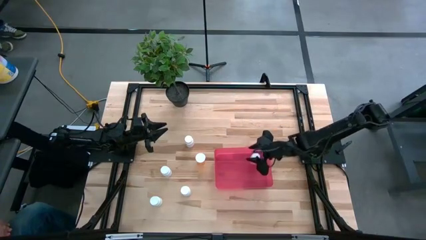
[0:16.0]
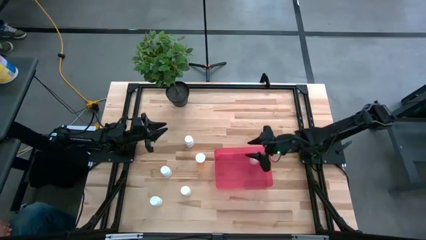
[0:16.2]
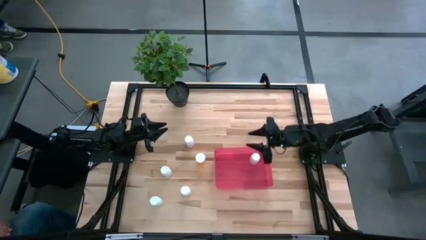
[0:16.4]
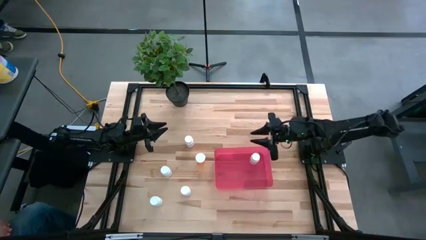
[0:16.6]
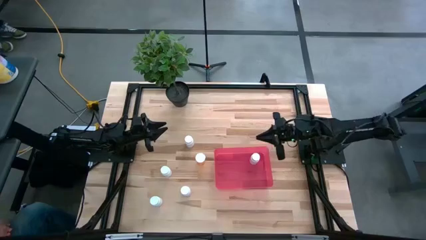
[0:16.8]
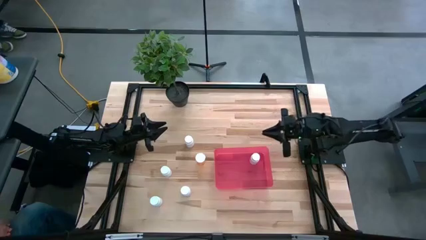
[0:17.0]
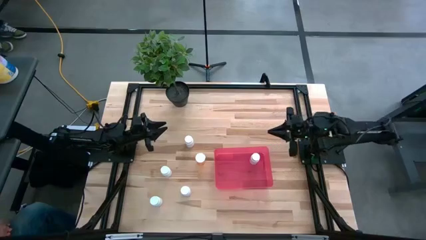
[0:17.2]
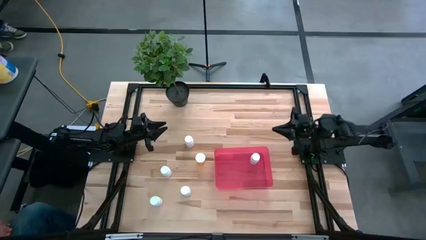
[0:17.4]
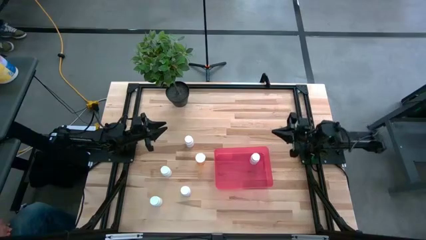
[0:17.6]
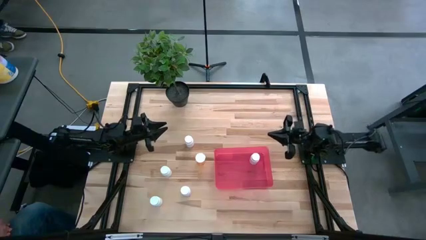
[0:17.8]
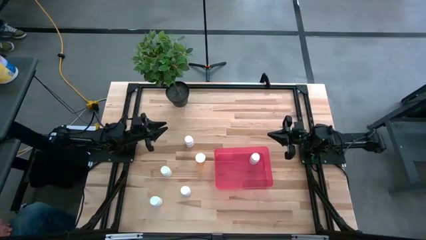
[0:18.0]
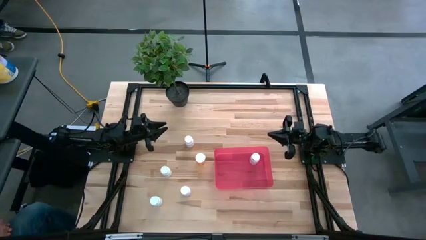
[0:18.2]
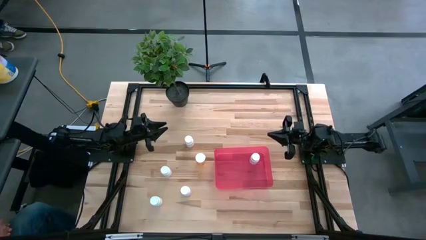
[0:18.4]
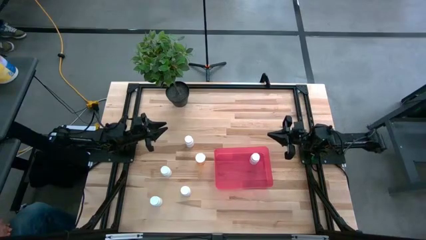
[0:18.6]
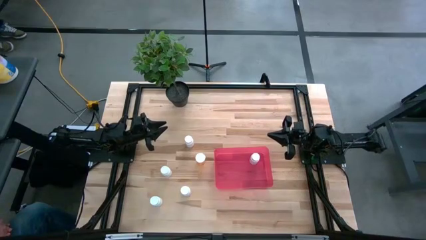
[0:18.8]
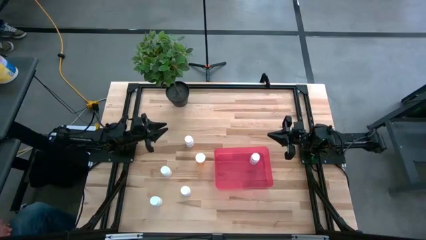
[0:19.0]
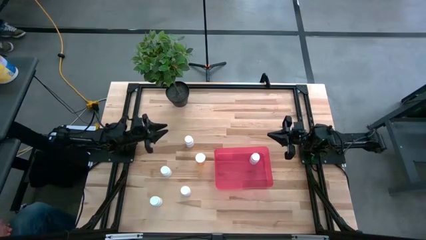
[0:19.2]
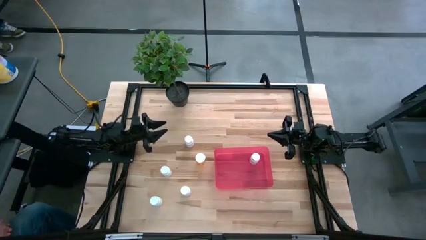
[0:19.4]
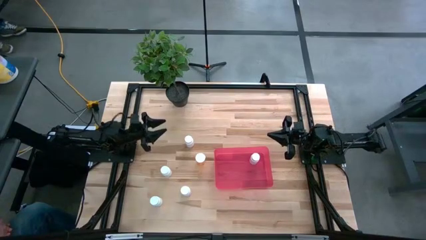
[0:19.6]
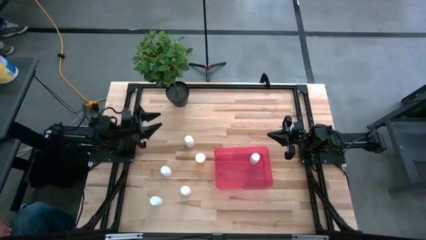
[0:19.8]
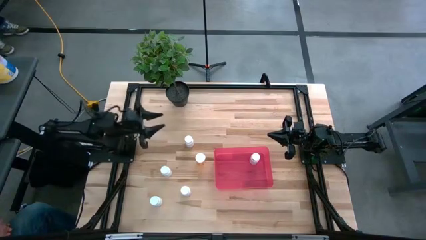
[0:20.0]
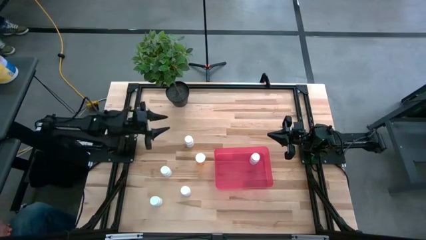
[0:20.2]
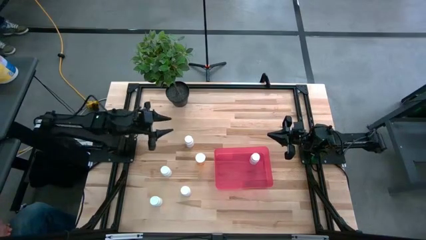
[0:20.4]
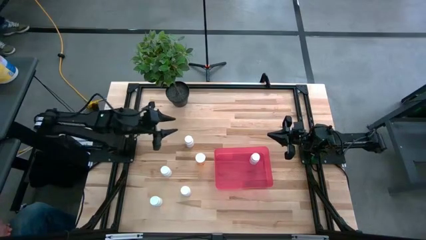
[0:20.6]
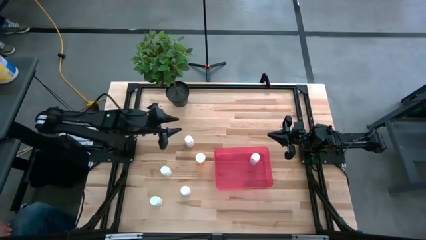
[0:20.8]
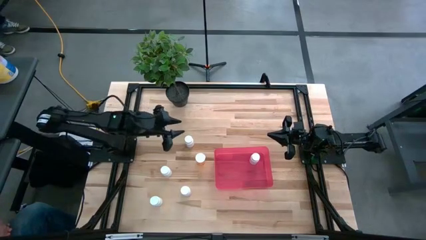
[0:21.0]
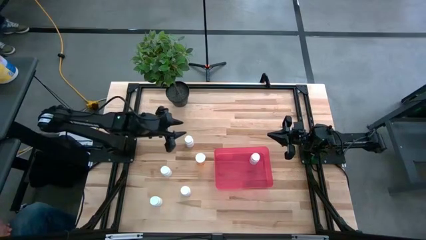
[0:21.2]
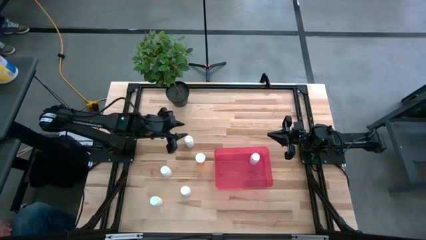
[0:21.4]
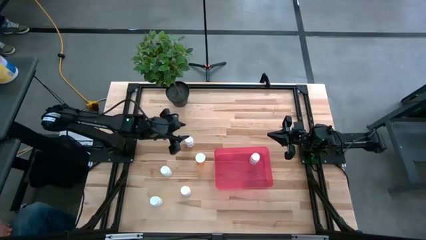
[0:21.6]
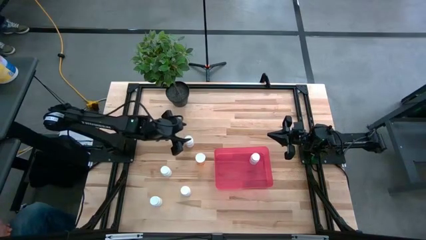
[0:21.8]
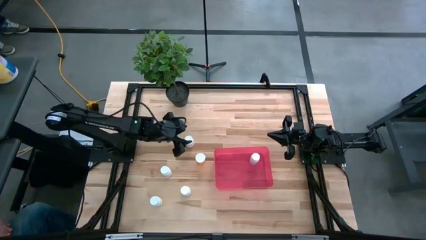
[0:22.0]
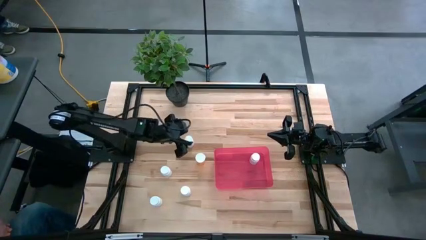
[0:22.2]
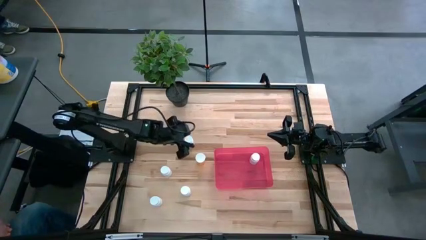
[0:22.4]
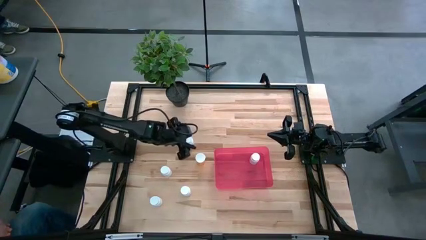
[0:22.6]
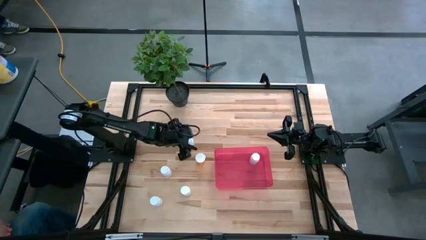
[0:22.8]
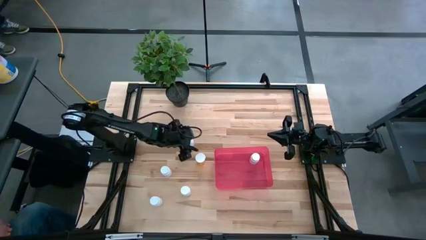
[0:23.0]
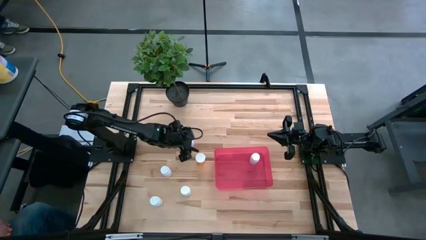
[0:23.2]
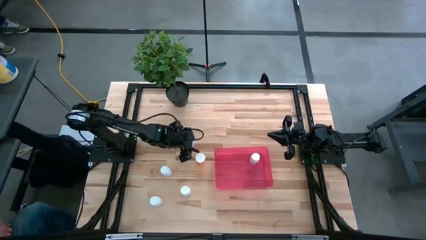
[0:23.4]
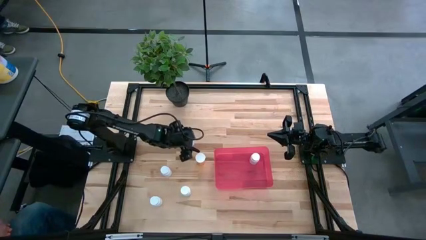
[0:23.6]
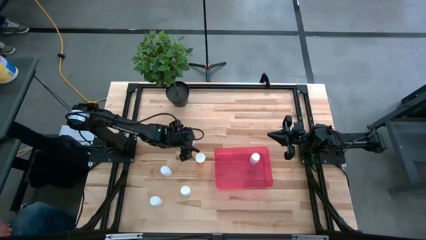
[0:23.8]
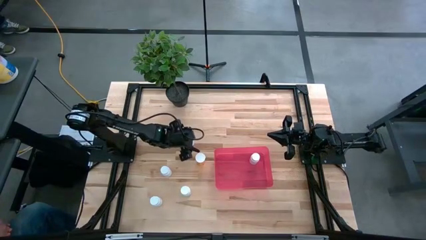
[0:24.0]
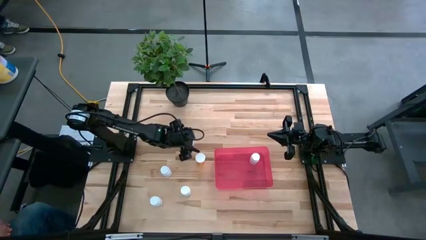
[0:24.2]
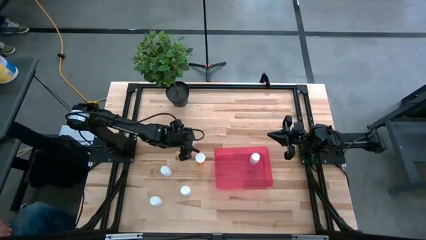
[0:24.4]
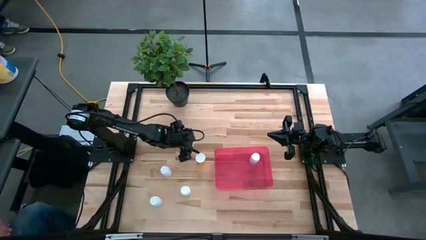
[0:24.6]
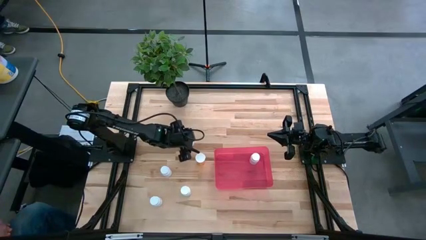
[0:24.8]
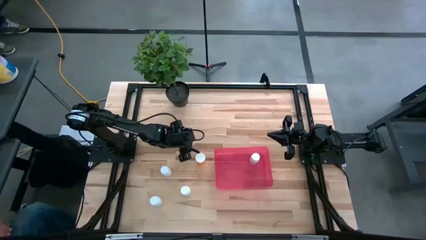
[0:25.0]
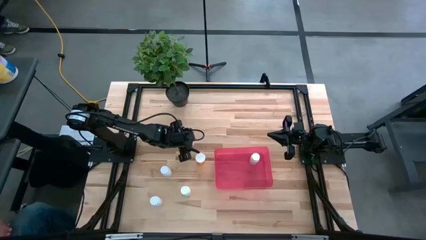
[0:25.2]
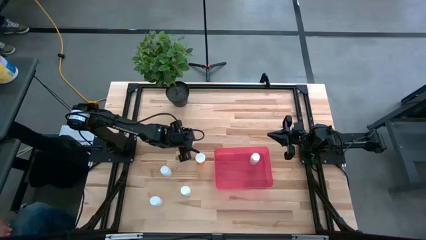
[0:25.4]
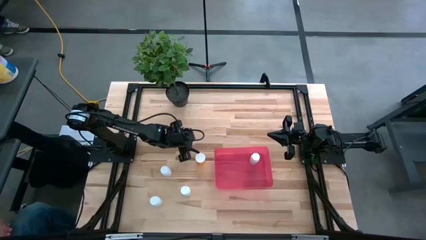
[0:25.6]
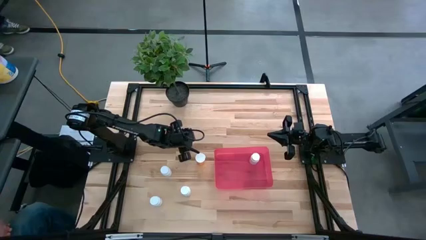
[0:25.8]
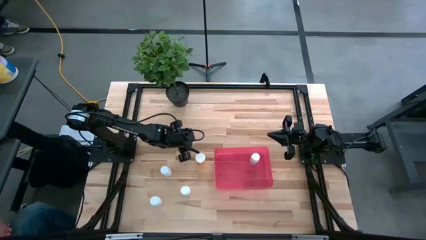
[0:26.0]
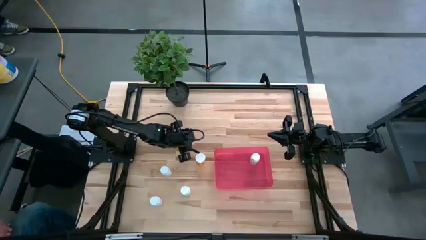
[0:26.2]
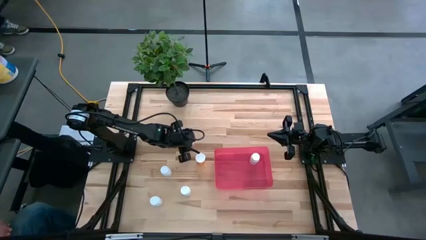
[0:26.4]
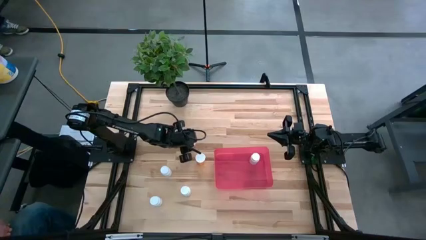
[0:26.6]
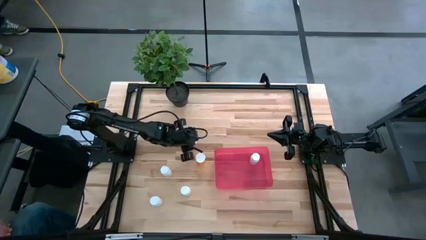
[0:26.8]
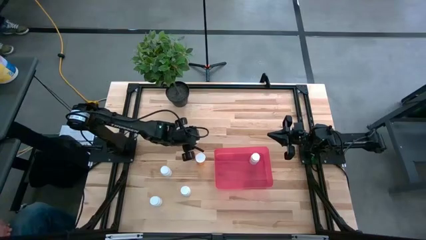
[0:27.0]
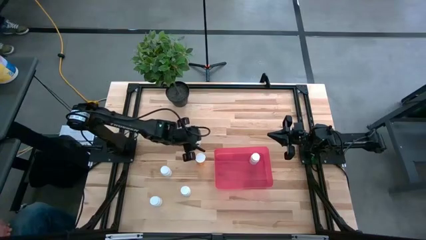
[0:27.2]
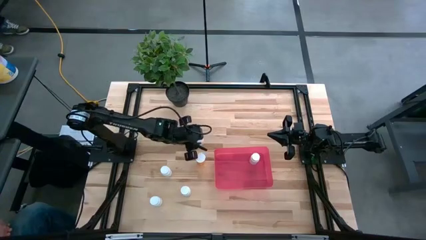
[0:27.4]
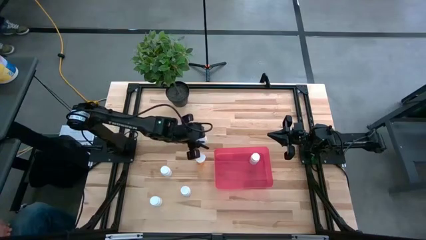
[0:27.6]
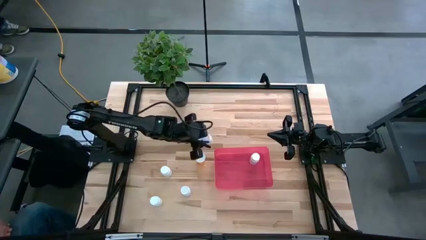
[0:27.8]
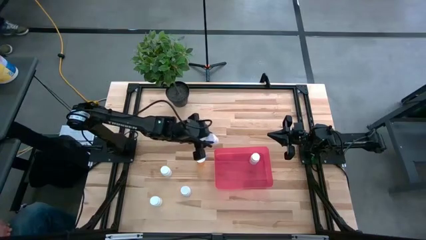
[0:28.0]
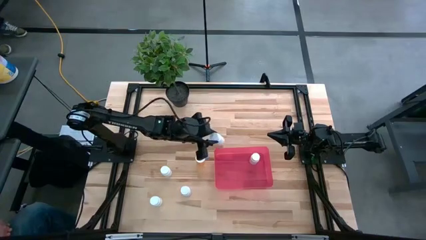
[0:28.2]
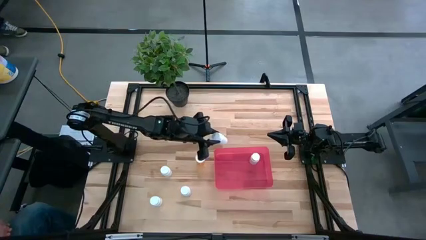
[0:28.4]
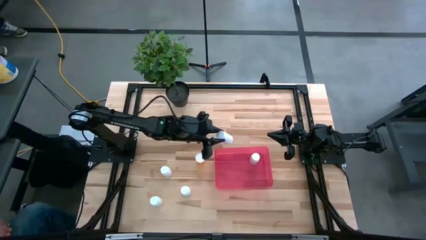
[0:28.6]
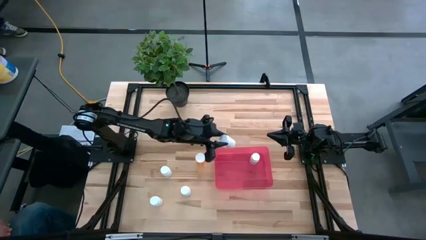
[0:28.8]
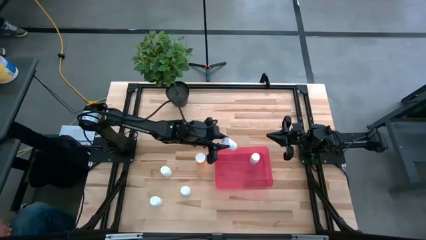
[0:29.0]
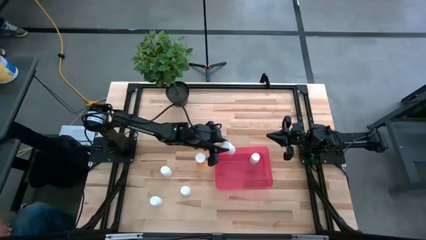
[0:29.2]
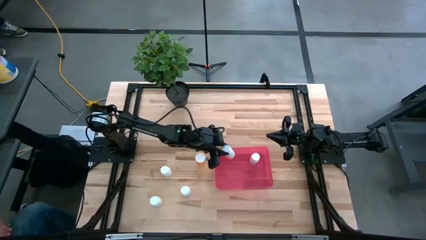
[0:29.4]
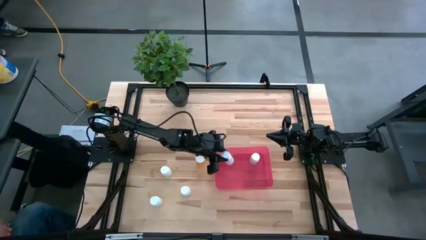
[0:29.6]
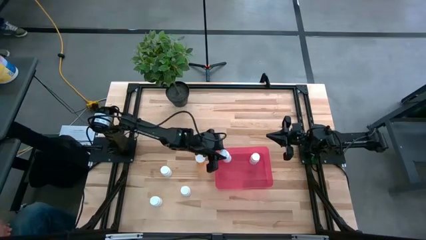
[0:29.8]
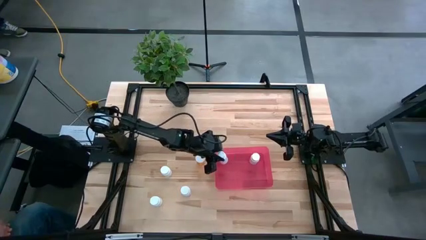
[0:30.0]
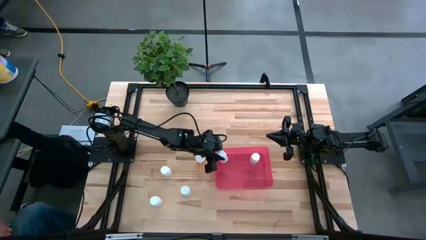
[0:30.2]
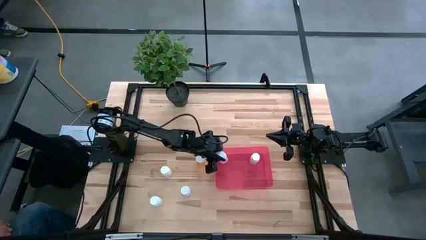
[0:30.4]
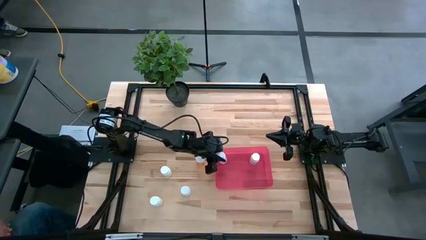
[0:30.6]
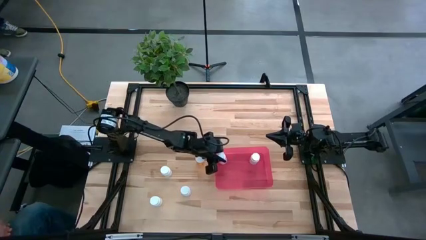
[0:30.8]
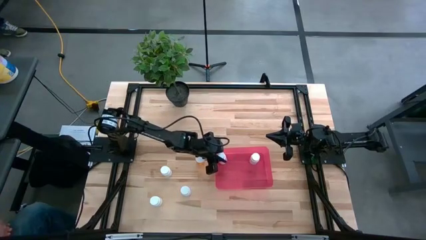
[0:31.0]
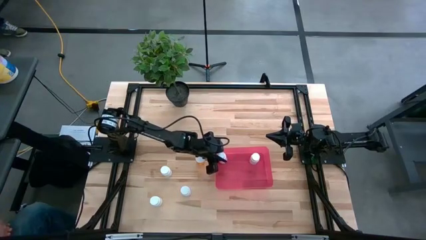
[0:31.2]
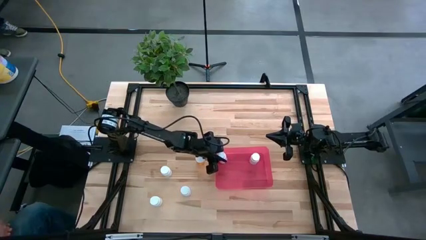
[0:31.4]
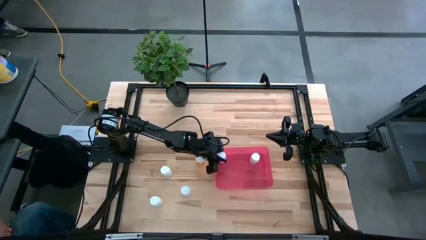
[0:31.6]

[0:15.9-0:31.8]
Task: Pick and place pill bottles into a basket
Put the white pill bottle into the pink bin
